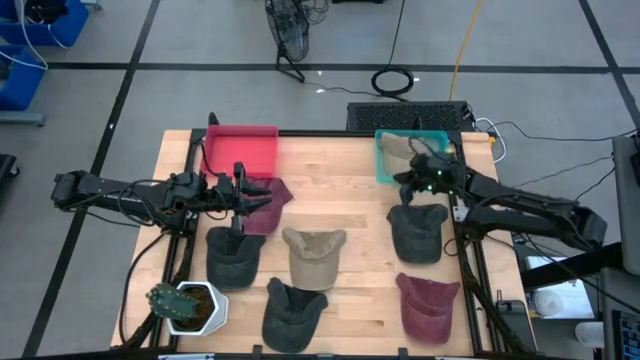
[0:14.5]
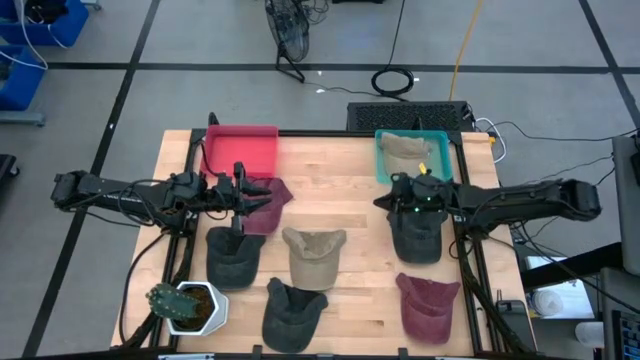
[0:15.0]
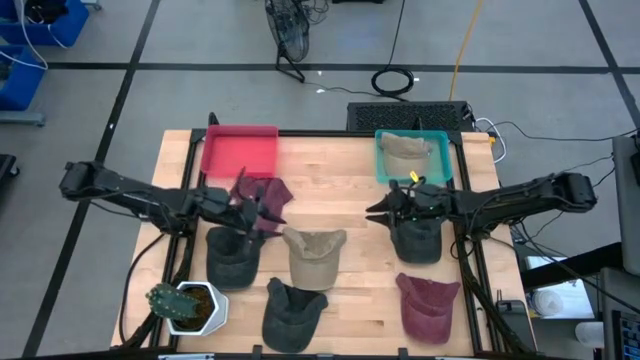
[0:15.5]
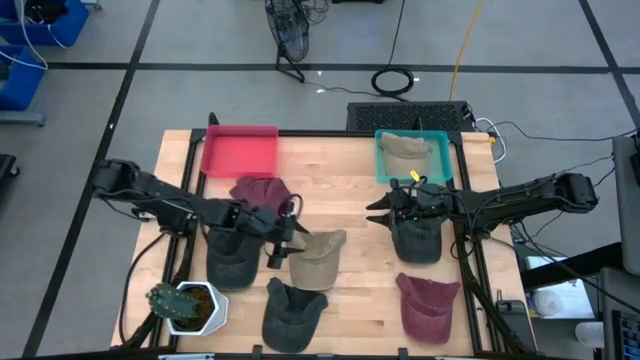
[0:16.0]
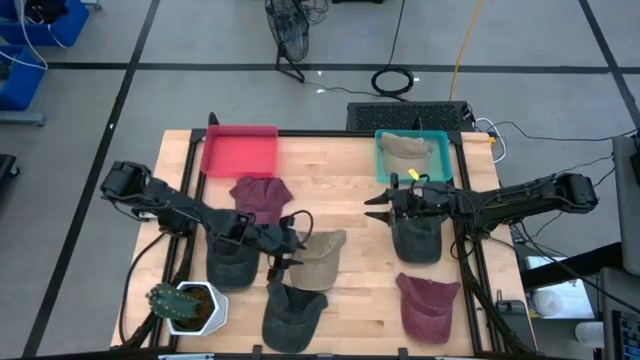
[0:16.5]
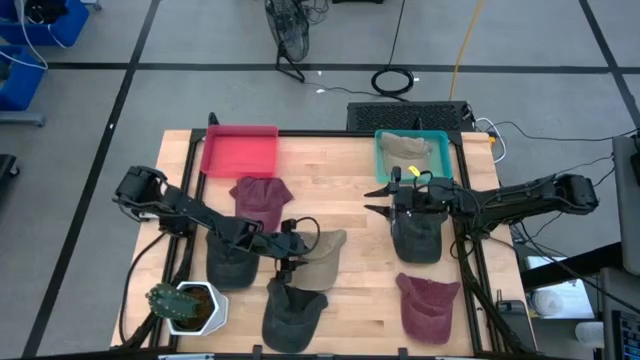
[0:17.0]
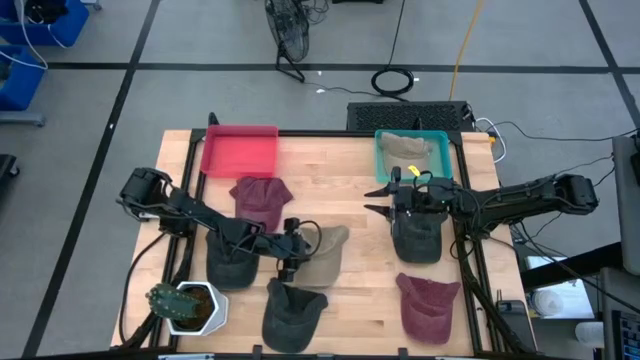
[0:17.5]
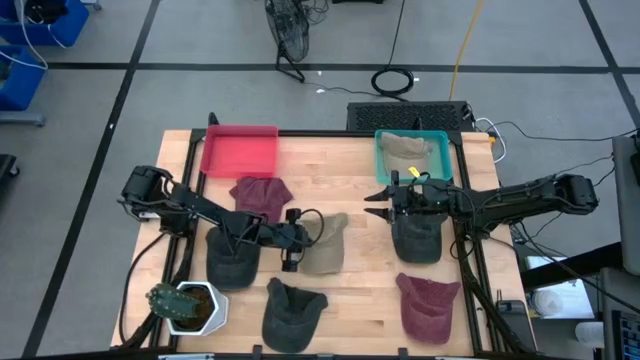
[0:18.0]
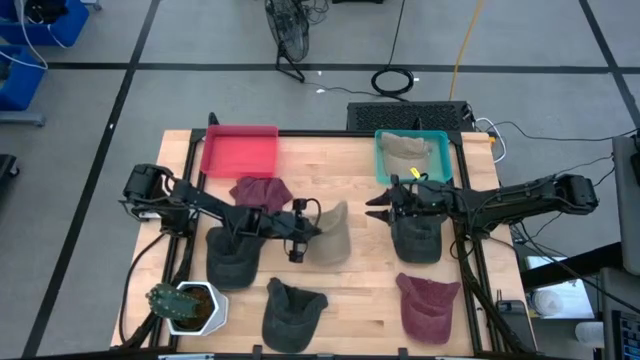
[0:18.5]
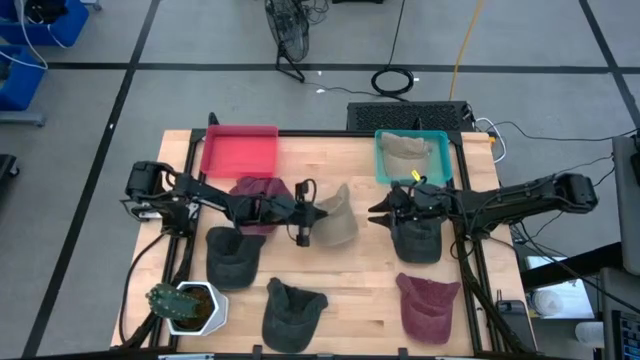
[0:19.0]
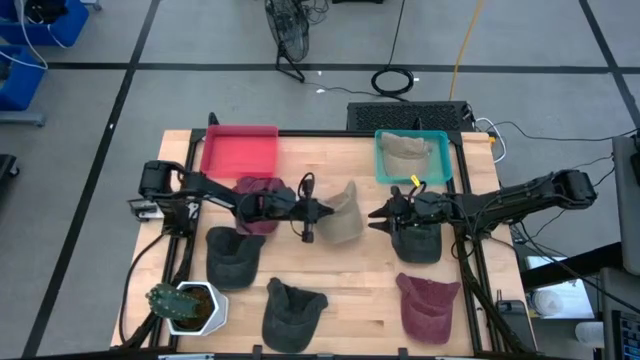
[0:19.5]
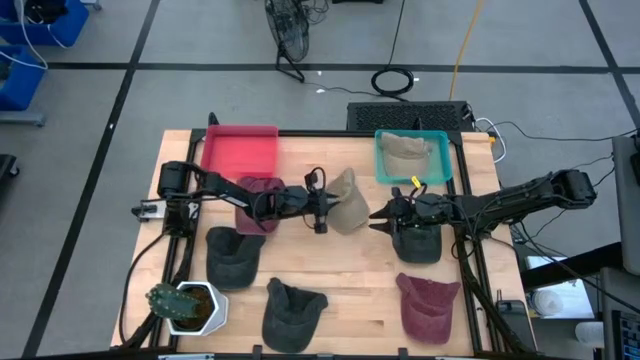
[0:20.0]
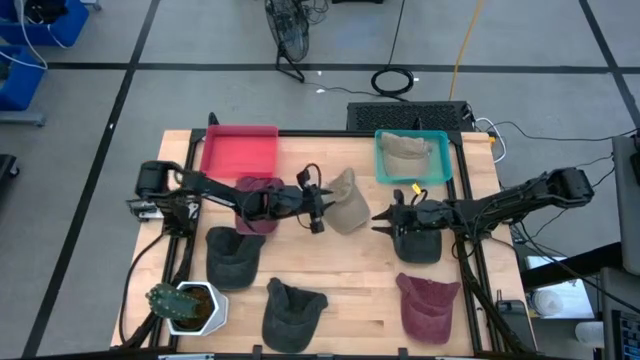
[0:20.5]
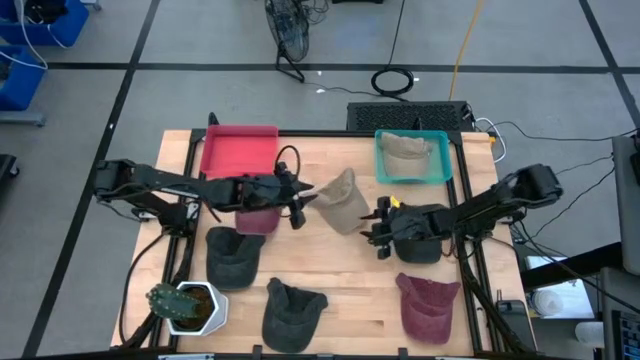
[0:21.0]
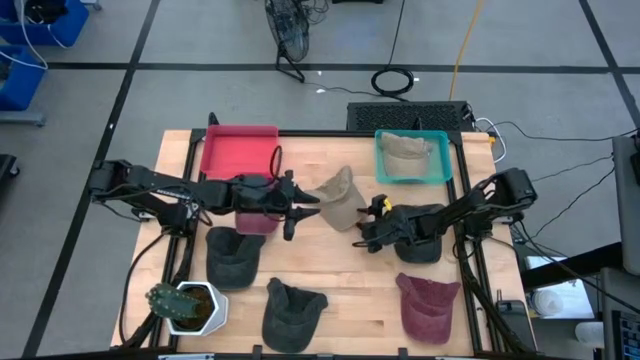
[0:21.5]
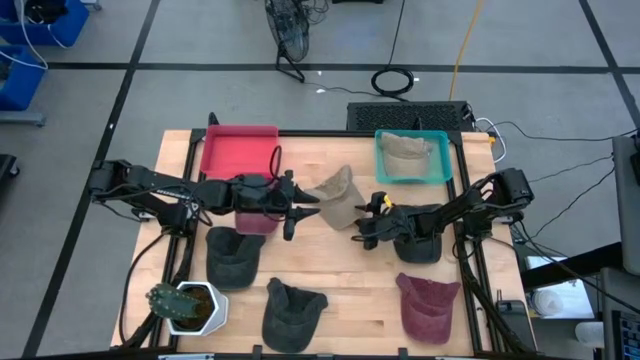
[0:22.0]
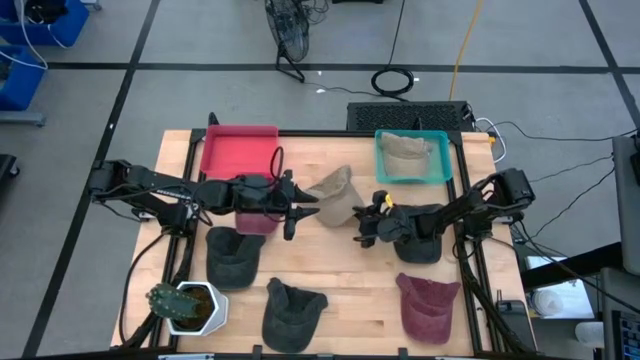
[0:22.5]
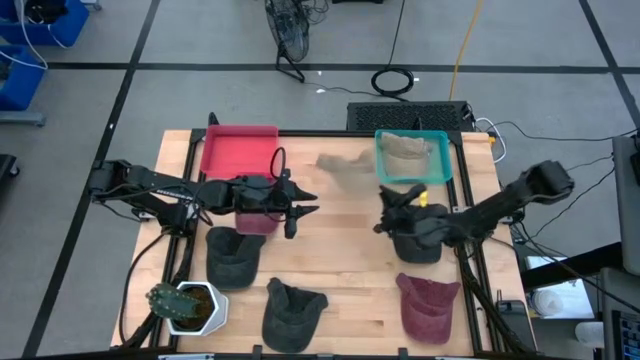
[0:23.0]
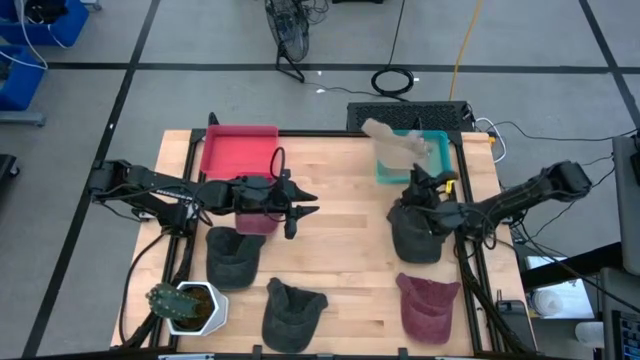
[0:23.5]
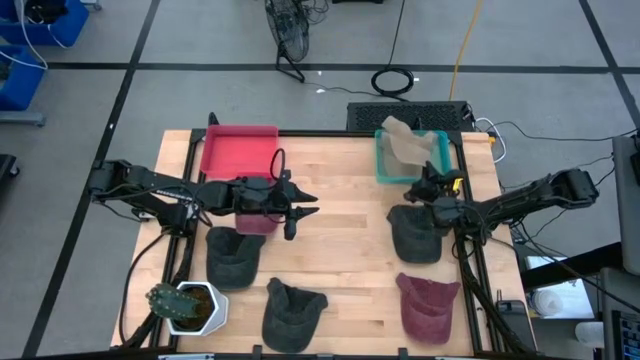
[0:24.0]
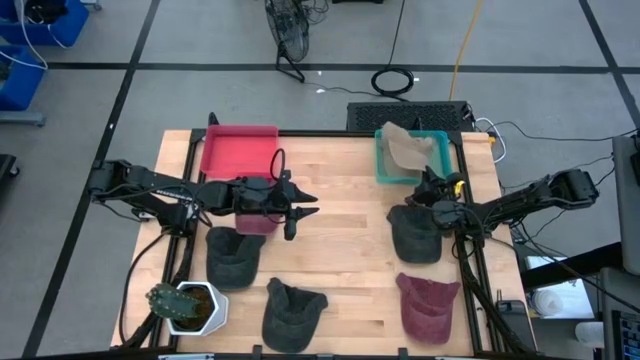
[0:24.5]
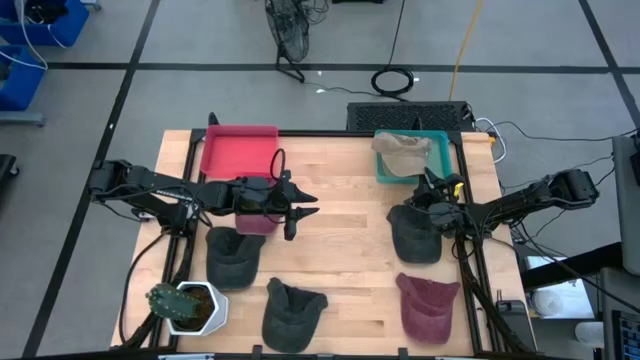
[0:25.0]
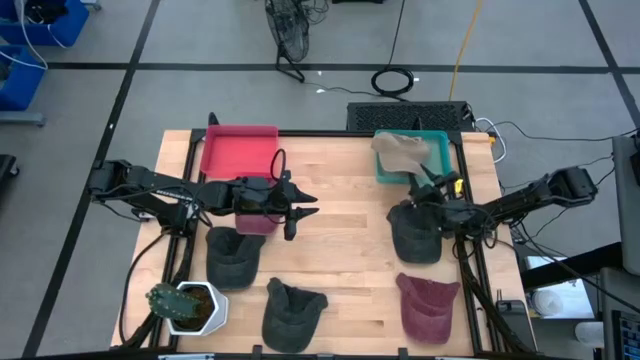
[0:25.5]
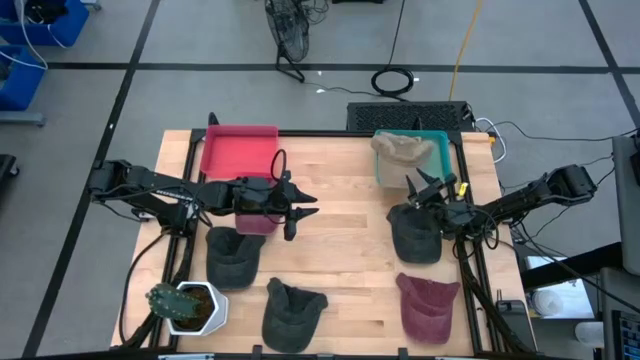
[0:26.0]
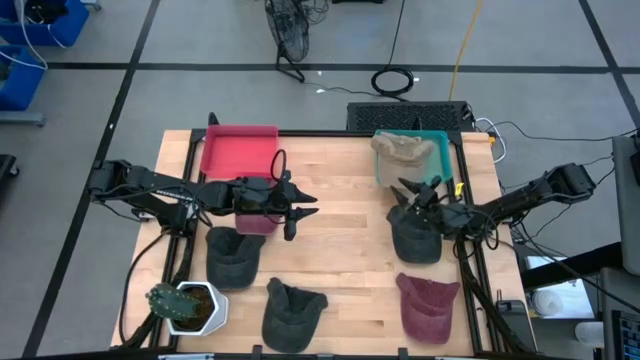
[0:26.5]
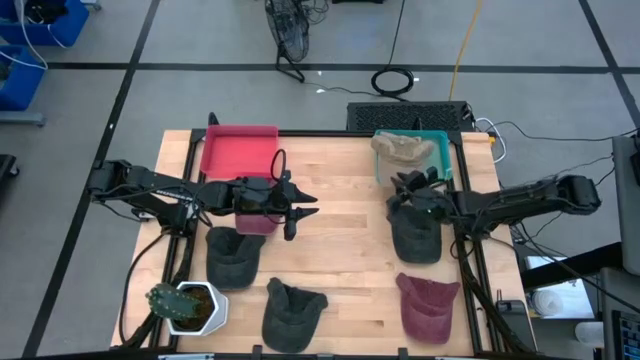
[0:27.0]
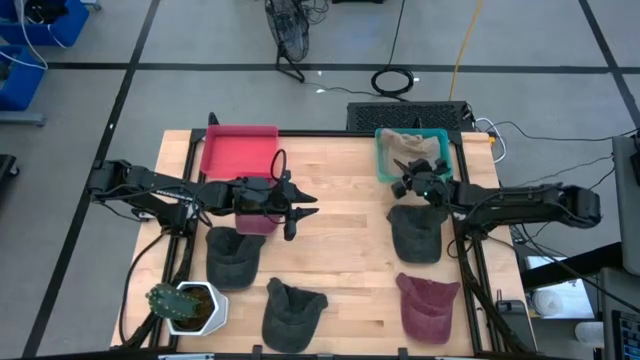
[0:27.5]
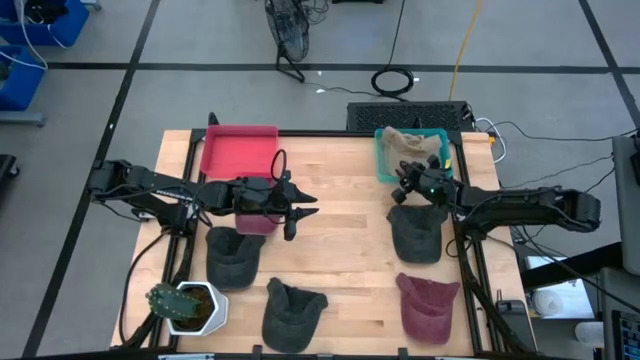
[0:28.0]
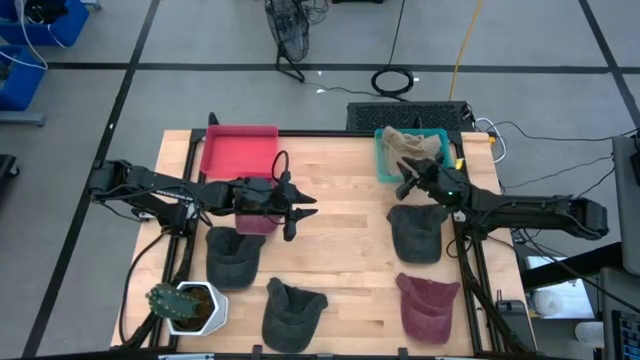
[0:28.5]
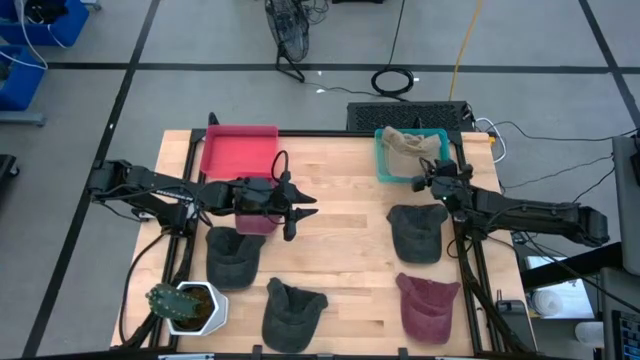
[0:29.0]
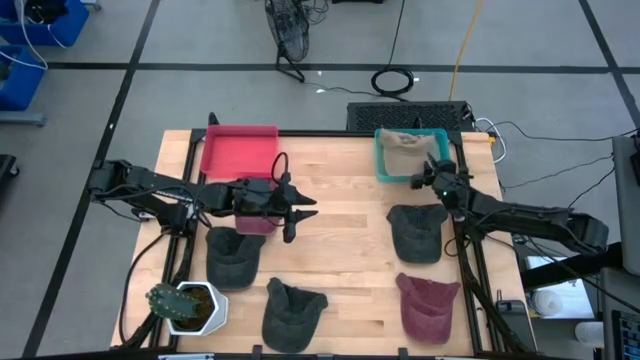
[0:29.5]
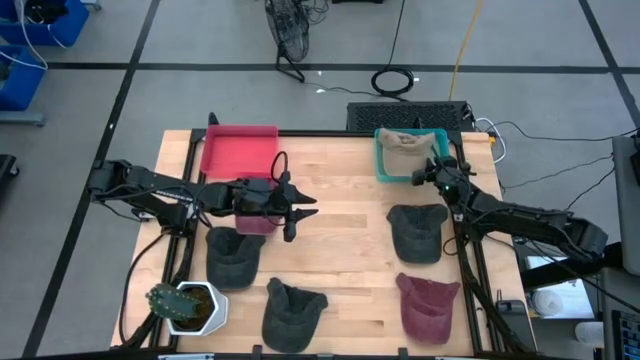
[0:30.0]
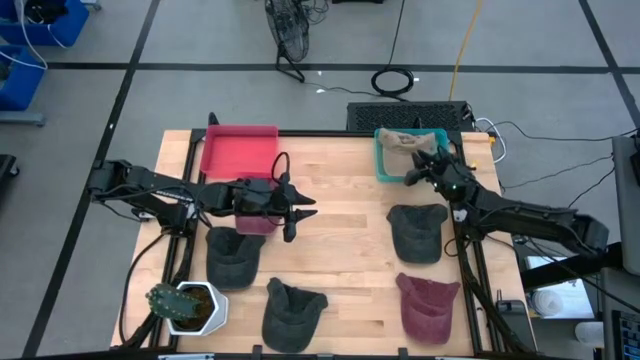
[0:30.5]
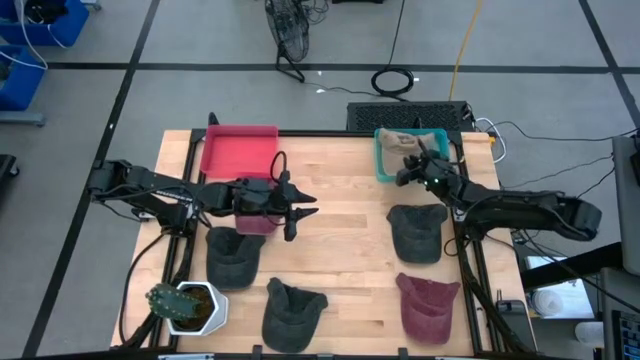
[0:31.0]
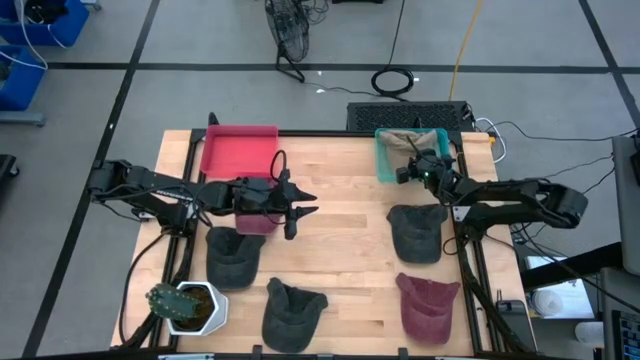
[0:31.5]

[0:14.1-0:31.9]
Task: Pick & Place hat
Put the brown cap into the green bin

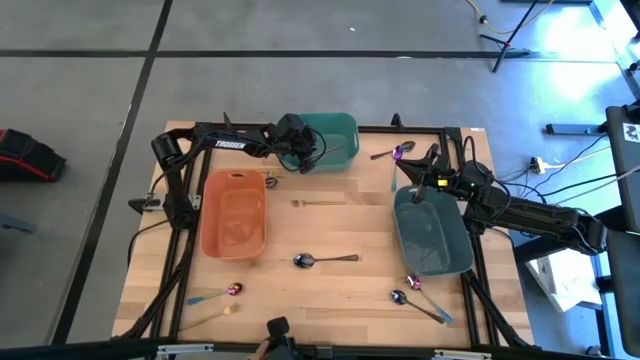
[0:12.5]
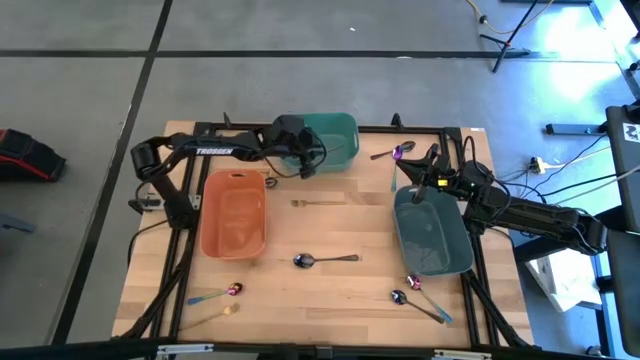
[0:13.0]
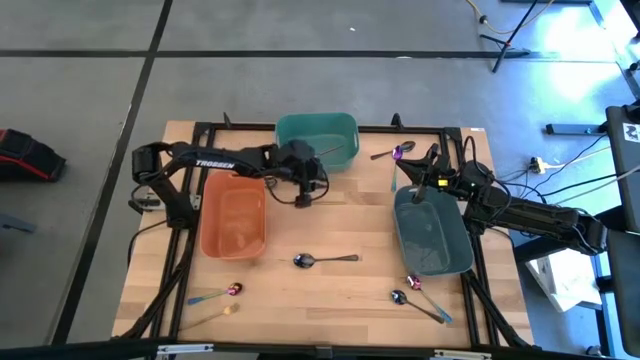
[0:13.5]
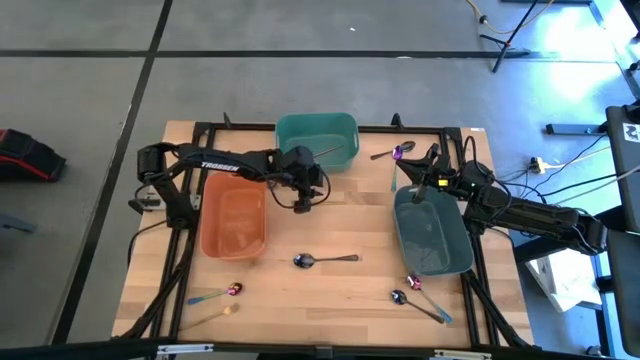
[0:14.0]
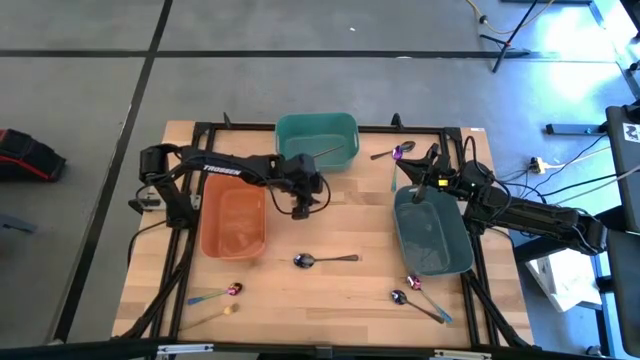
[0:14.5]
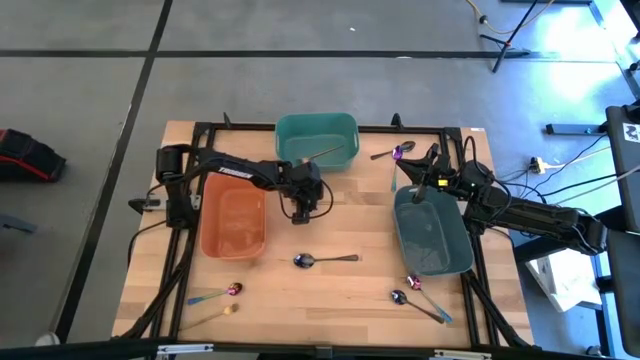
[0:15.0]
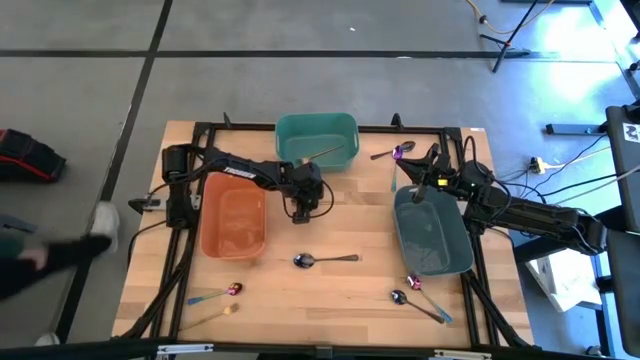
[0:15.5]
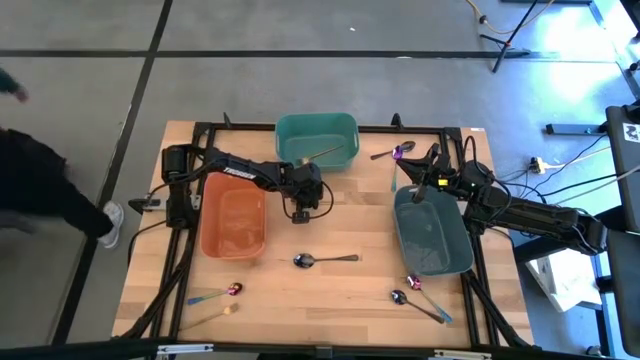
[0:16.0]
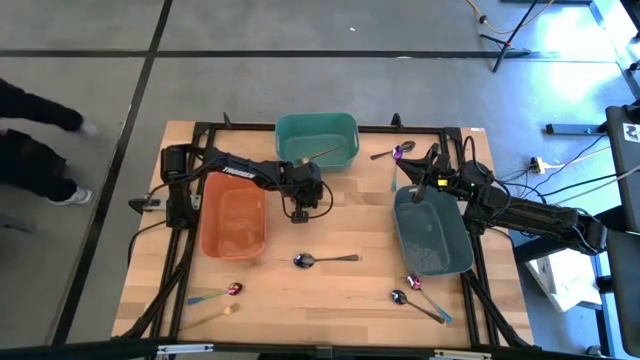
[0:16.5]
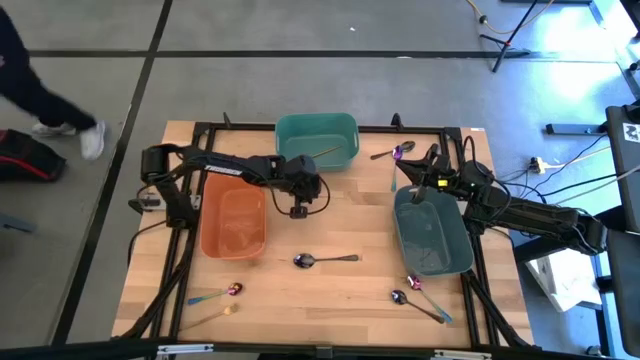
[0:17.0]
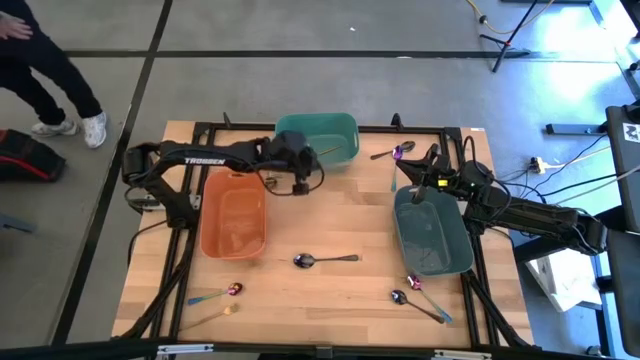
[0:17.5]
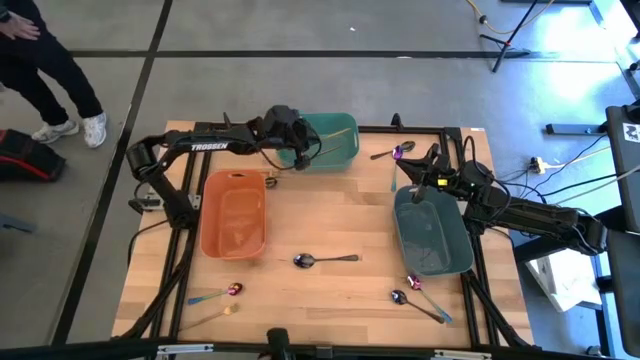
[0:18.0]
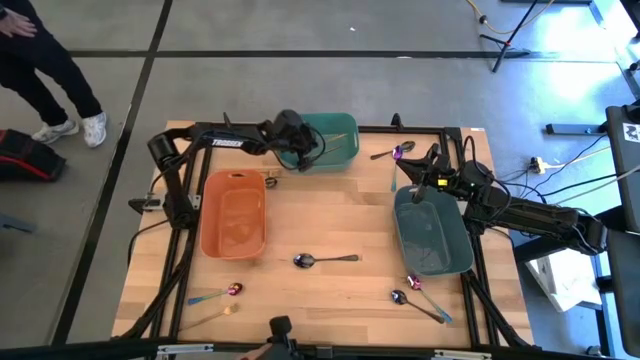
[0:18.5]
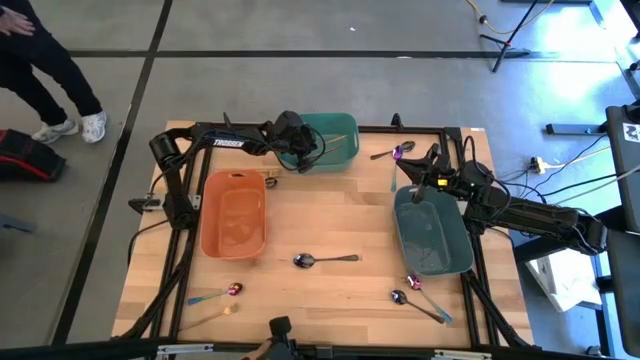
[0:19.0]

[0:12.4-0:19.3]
Task: Sort silverware by color (type)
Put the gold fork into the green bin
